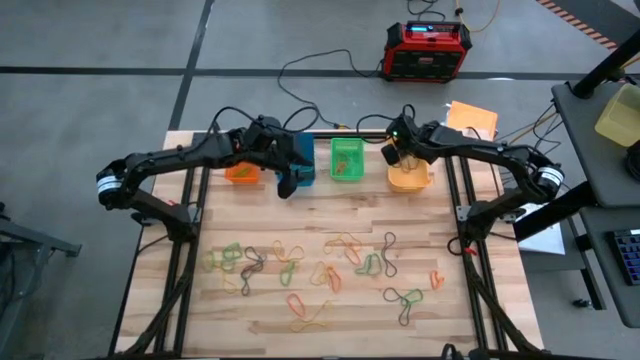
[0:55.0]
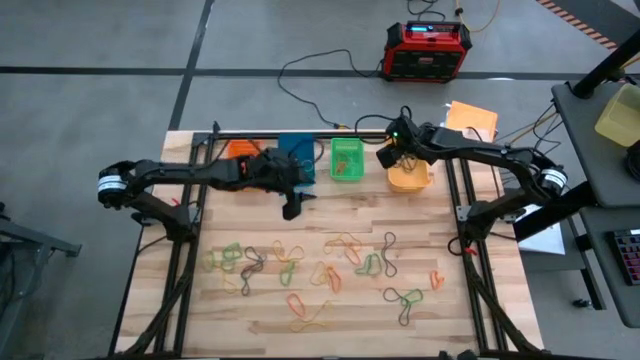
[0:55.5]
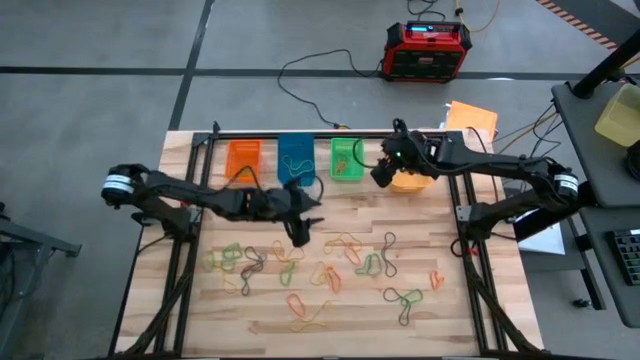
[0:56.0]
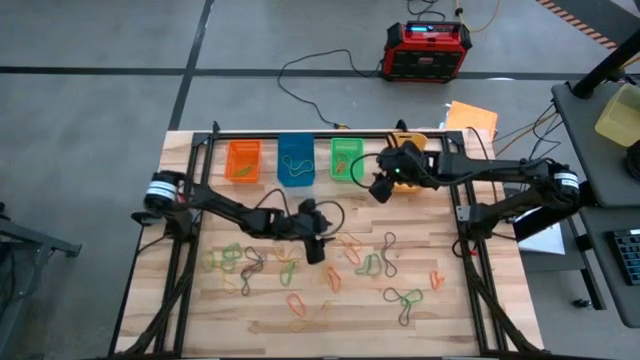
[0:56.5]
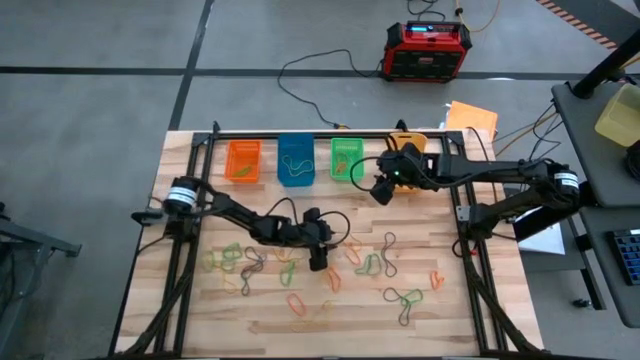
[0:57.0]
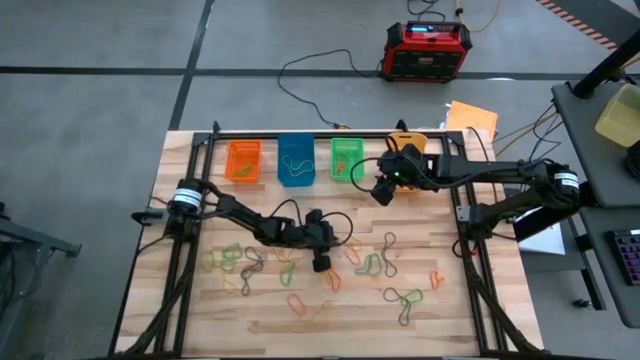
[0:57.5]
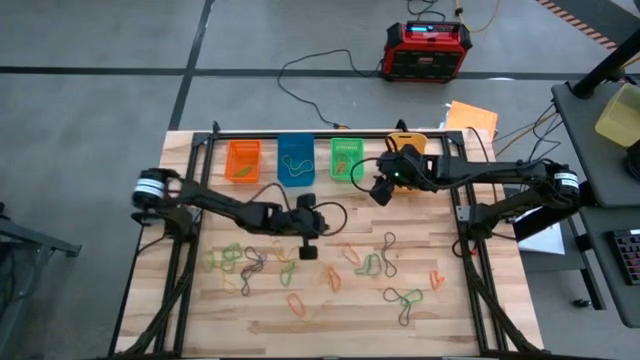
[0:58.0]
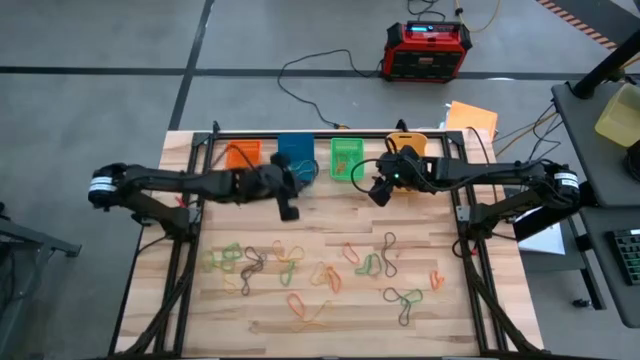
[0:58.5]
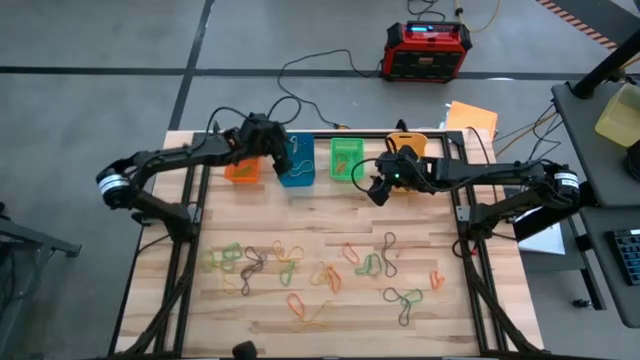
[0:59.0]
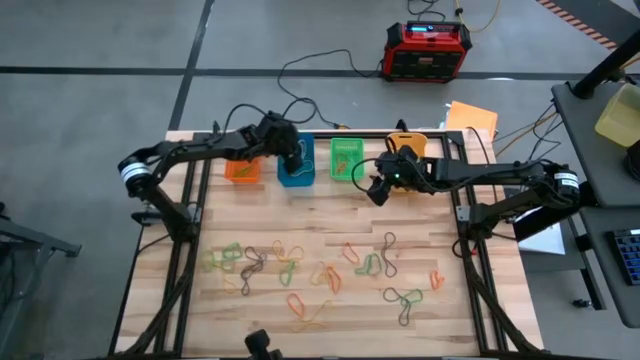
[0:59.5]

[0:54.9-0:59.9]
Task: Sort rubber bands into baskets
Put the yellow rubber band into the blue bin

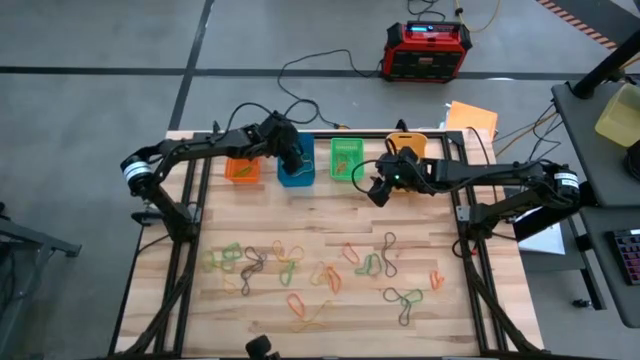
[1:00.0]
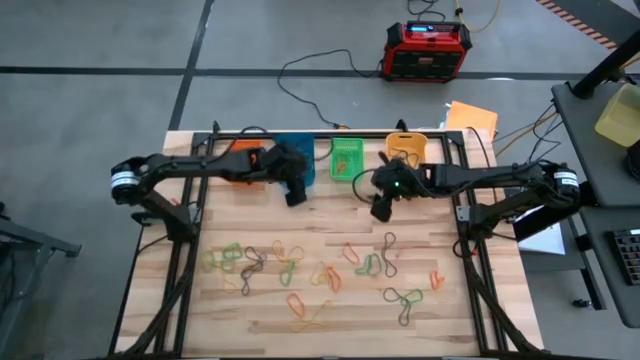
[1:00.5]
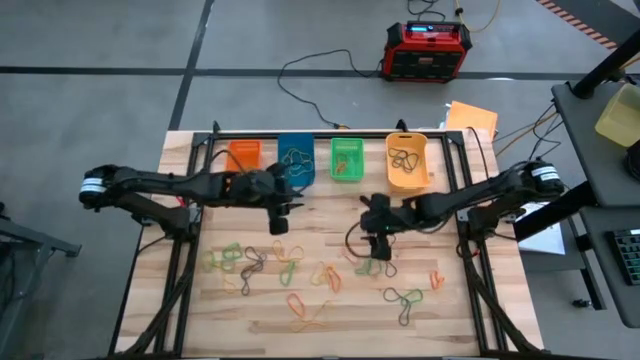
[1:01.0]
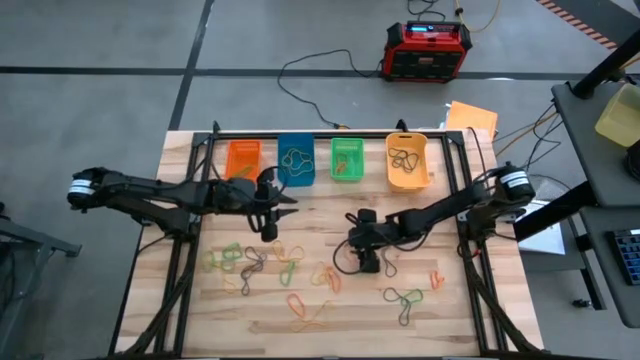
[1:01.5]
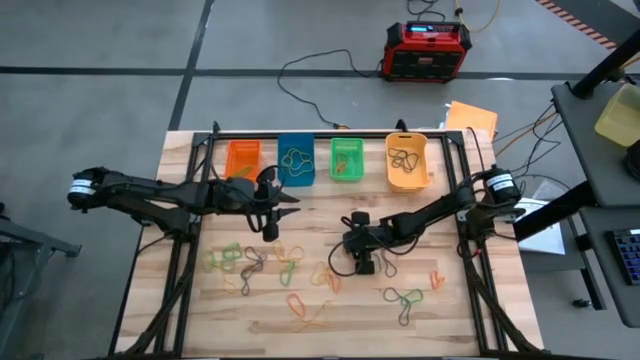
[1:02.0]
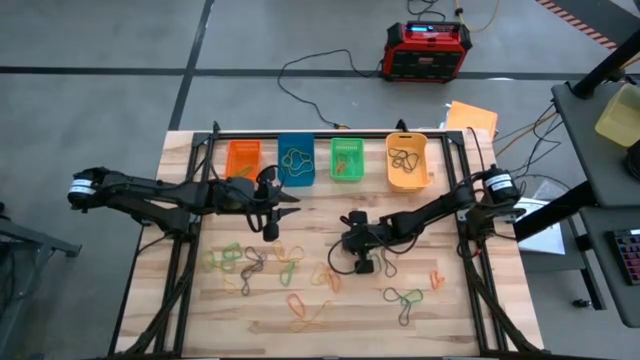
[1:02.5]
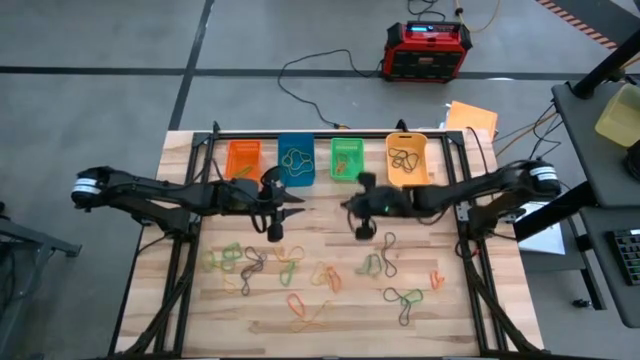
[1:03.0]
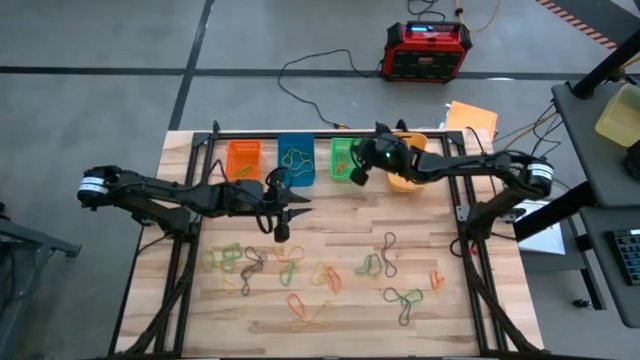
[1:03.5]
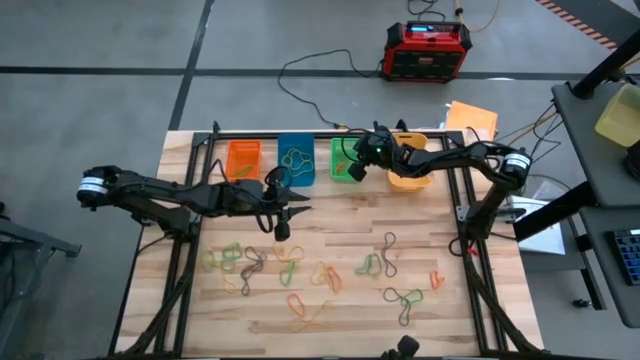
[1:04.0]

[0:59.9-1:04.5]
Put the orange rubber band into the green bin

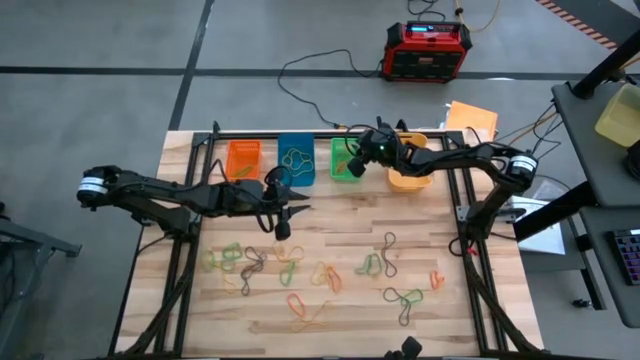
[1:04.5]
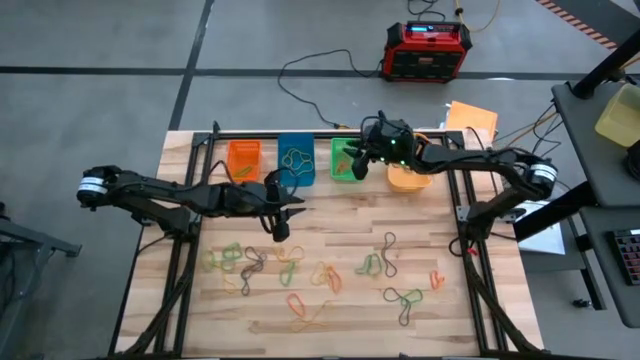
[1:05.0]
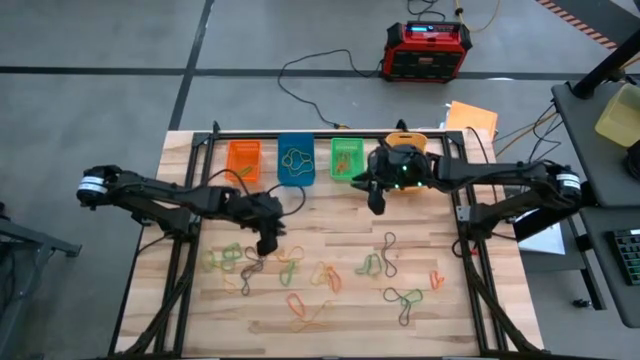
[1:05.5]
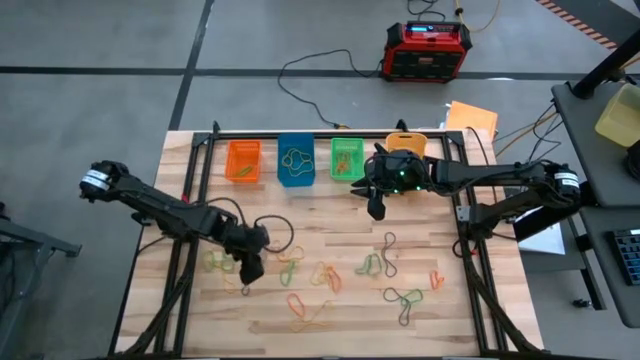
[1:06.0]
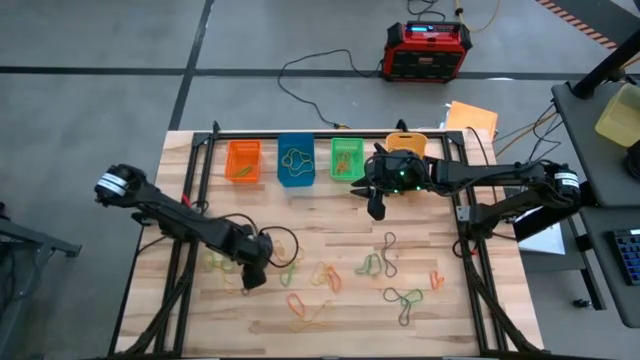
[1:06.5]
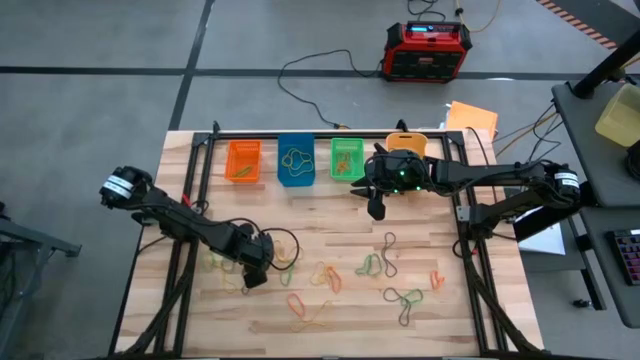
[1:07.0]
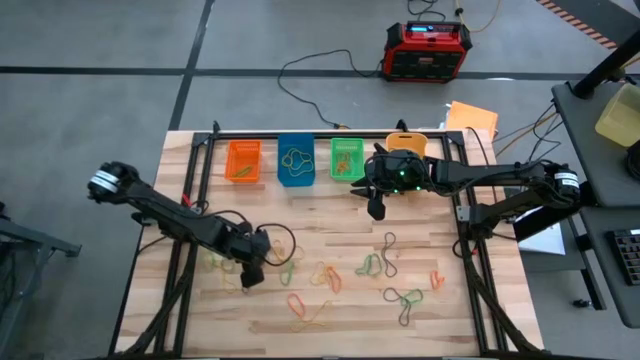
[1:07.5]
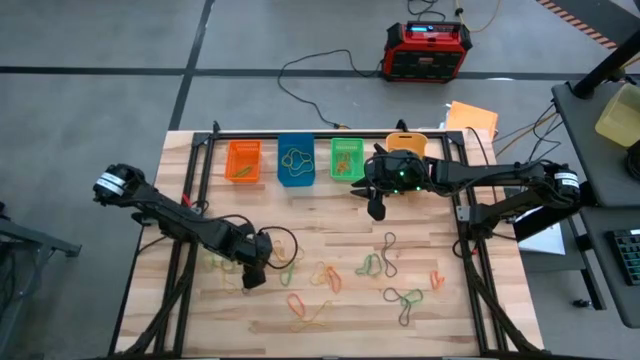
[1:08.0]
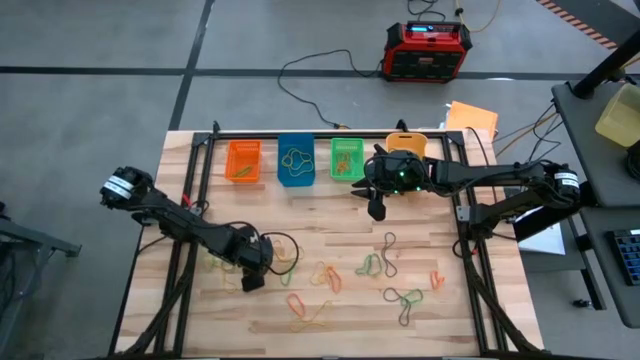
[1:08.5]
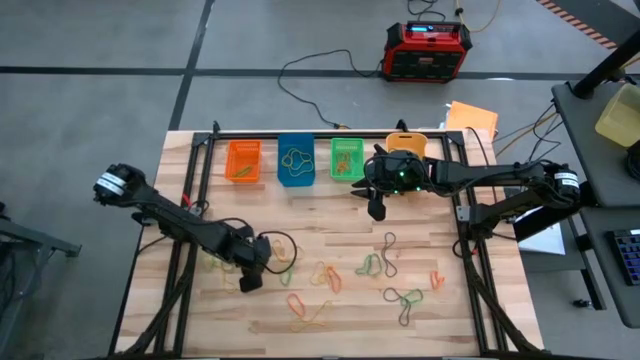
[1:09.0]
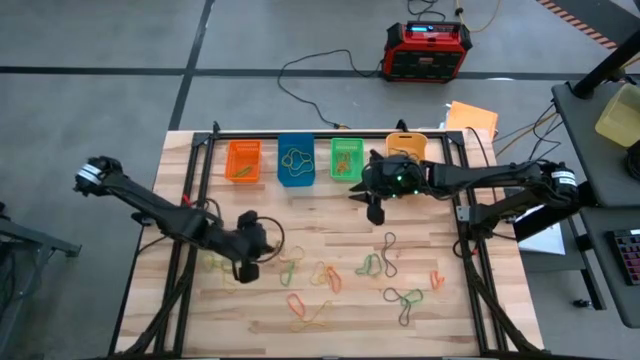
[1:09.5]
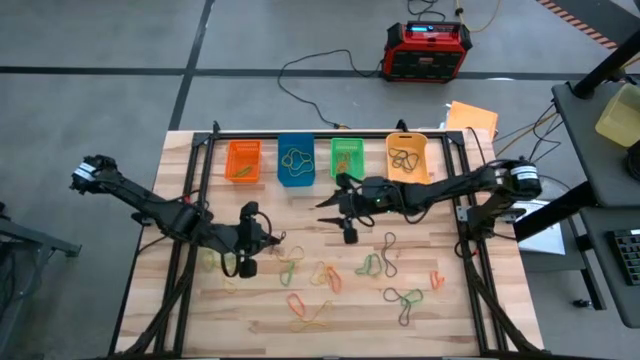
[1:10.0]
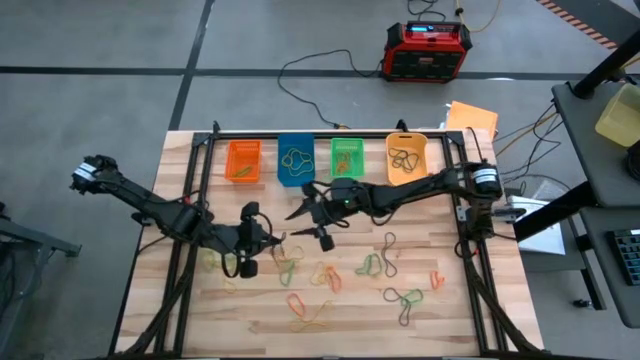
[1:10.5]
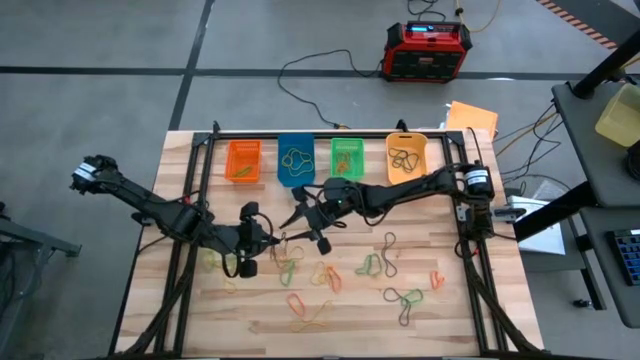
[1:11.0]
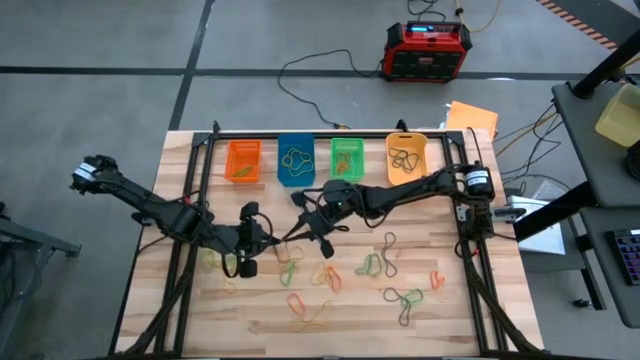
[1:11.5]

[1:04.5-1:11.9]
Put the purple rubber band into the light orange bin

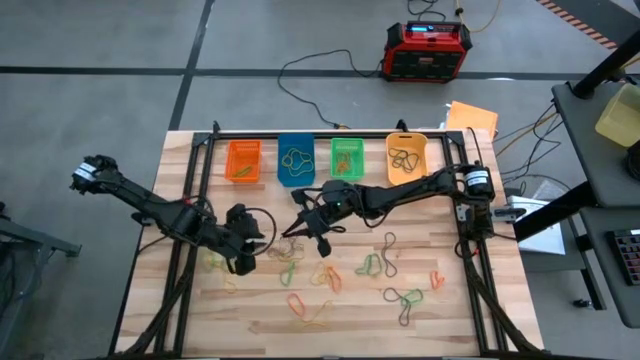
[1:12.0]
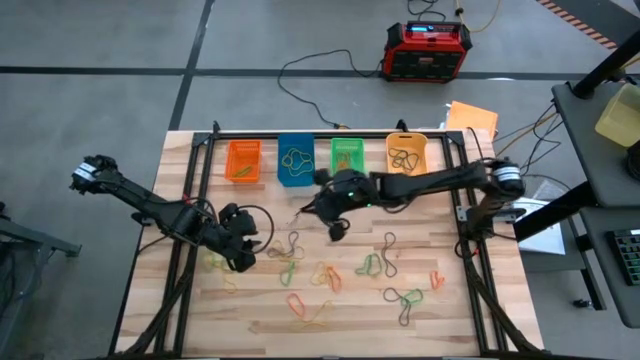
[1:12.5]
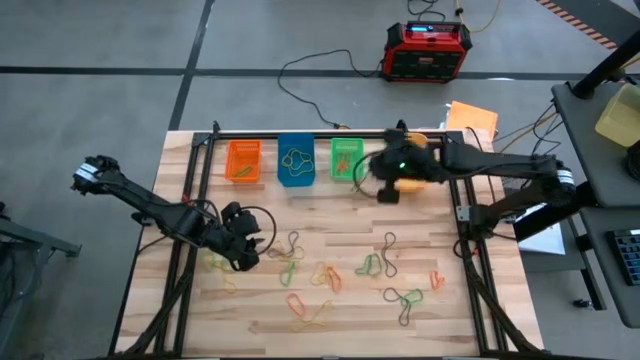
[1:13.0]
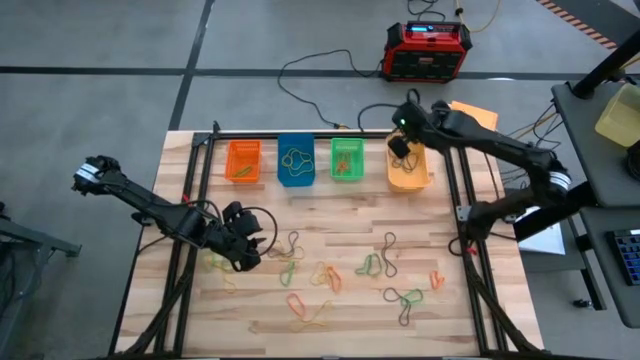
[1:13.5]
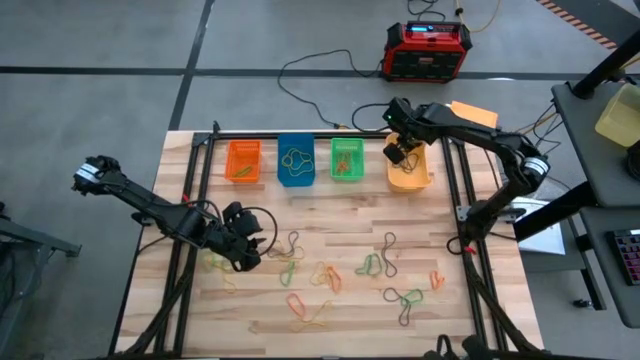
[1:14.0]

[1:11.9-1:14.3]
Put the purple rubber band into the light orange bin

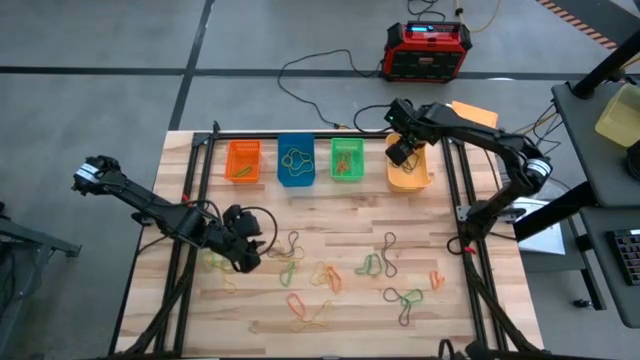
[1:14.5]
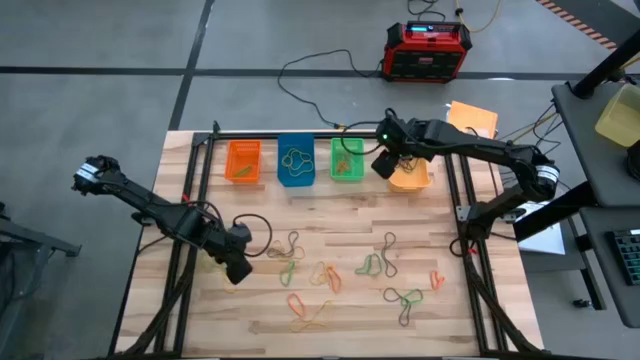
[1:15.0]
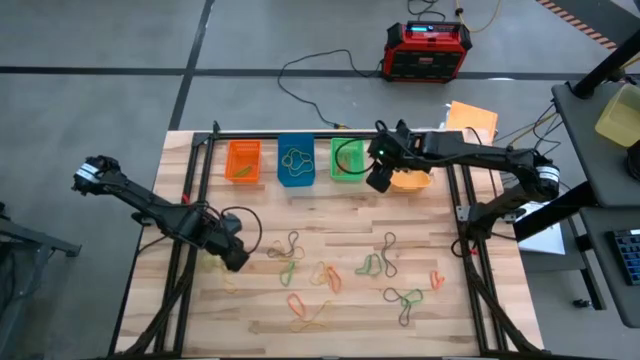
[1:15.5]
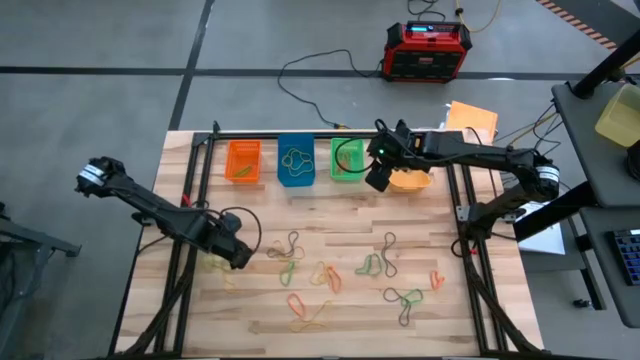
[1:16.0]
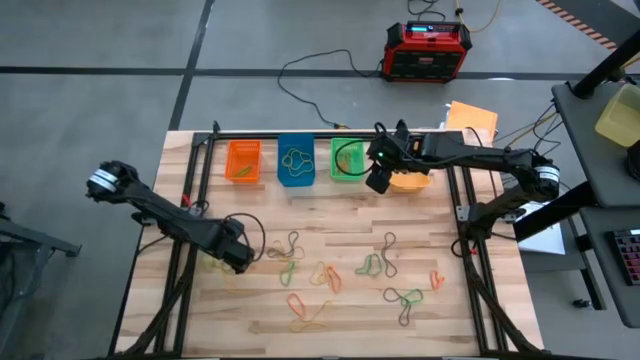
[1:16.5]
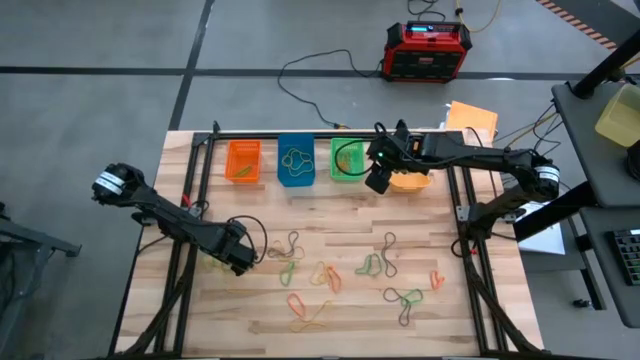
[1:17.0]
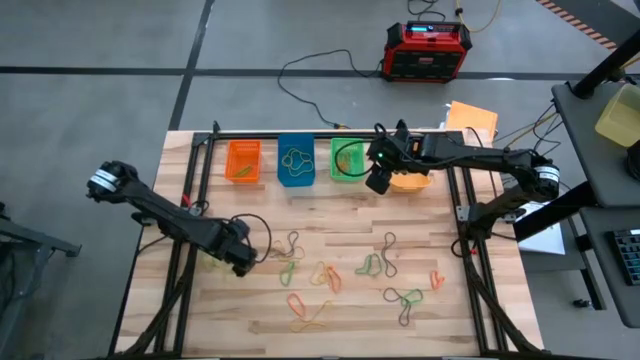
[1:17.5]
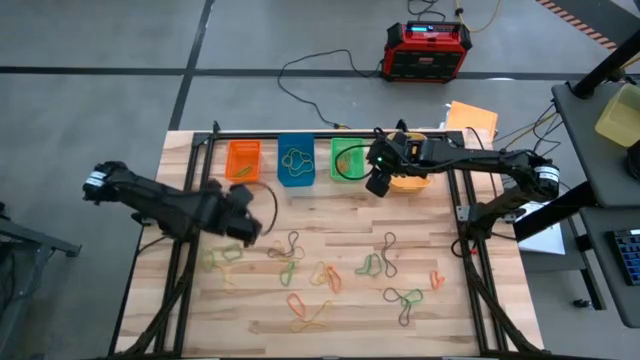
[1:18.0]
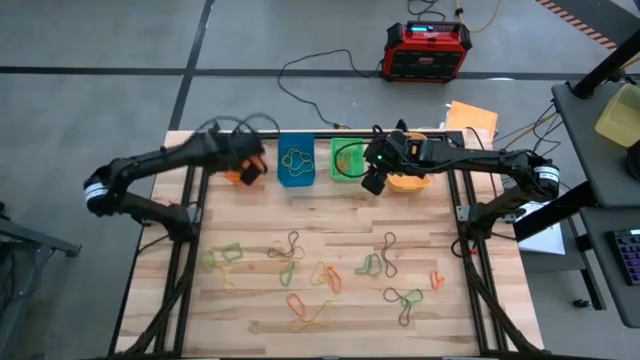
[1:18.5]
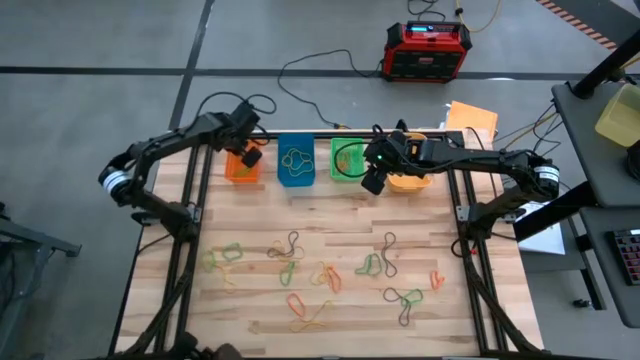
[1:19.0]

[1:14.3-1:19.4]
Put the green rubber band into the orange bin
